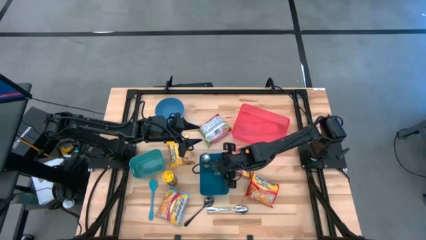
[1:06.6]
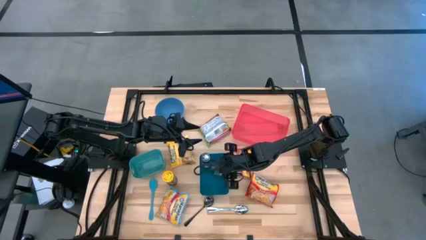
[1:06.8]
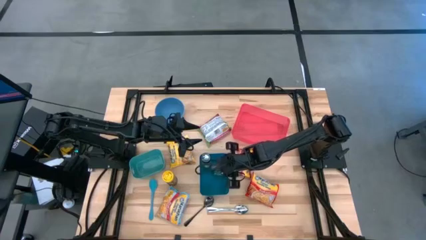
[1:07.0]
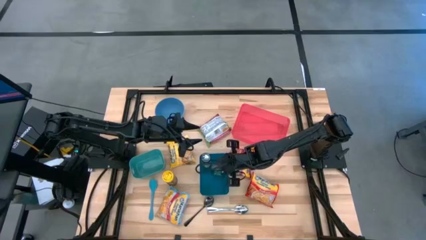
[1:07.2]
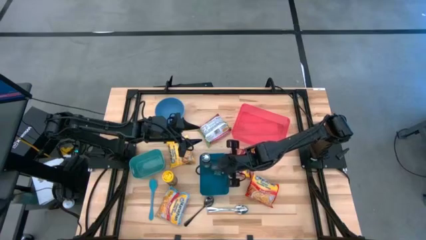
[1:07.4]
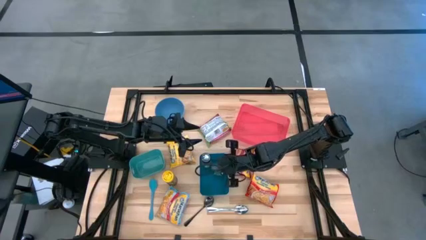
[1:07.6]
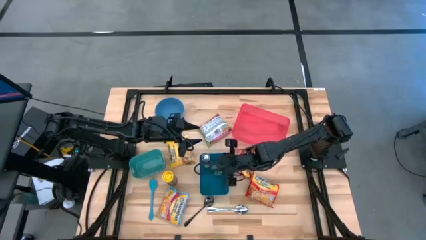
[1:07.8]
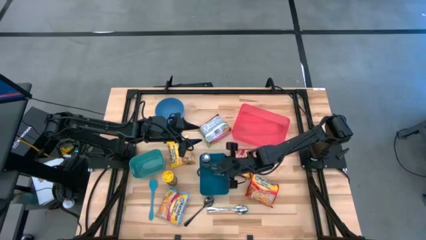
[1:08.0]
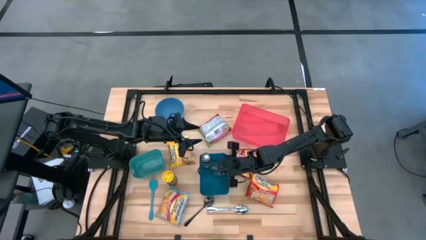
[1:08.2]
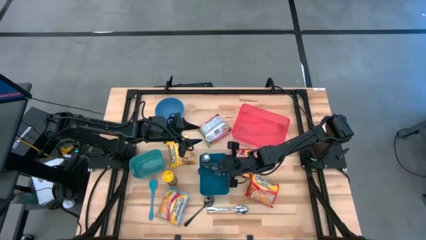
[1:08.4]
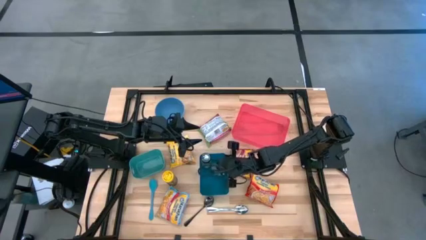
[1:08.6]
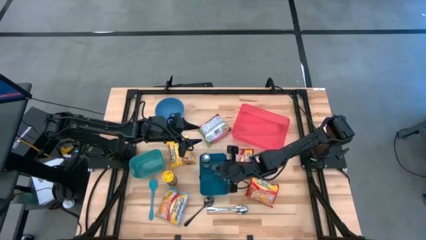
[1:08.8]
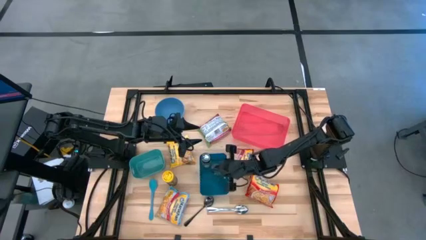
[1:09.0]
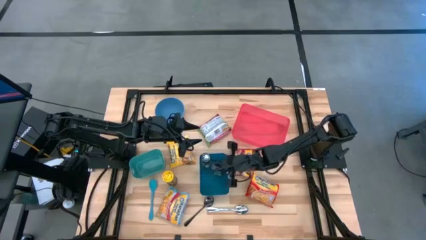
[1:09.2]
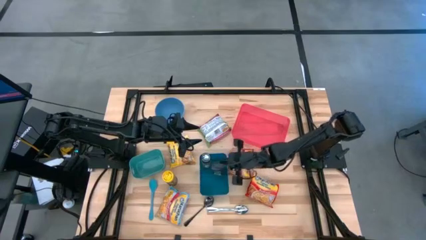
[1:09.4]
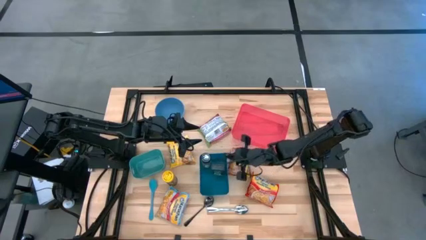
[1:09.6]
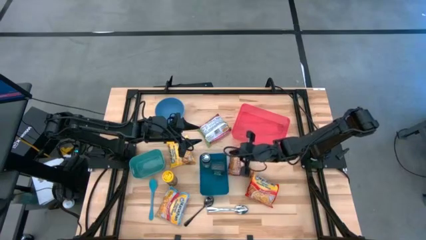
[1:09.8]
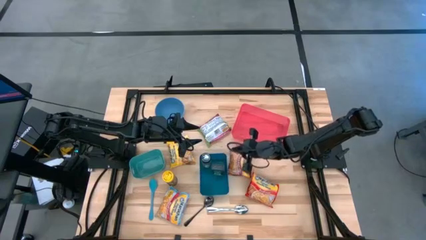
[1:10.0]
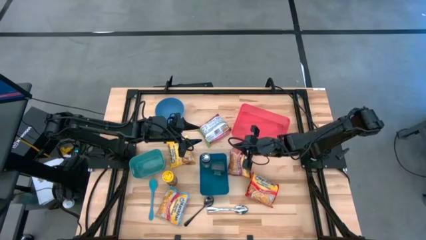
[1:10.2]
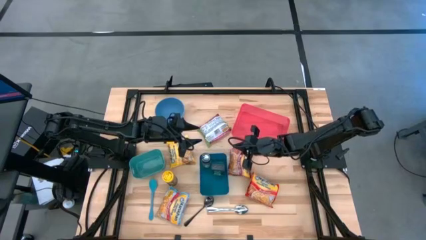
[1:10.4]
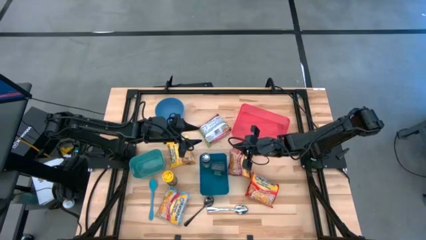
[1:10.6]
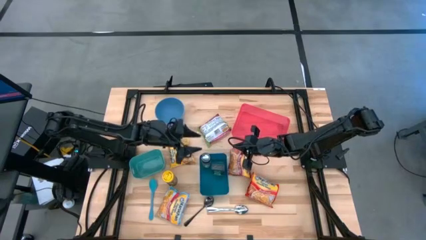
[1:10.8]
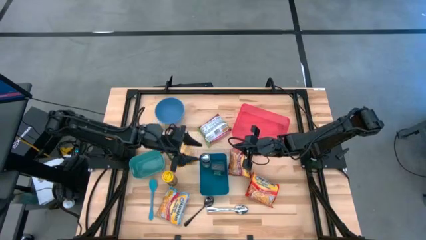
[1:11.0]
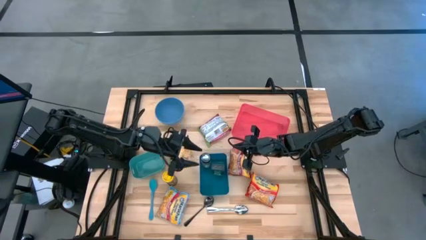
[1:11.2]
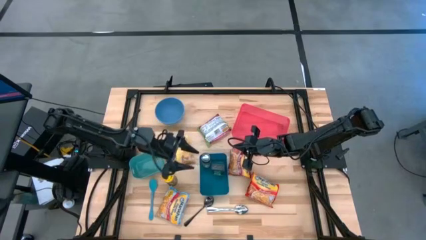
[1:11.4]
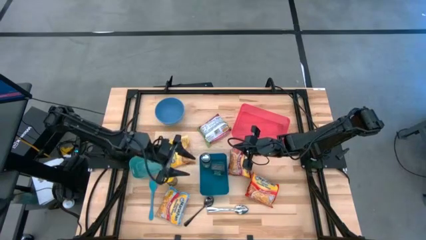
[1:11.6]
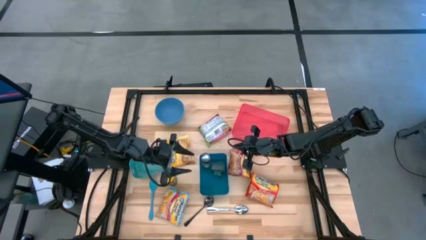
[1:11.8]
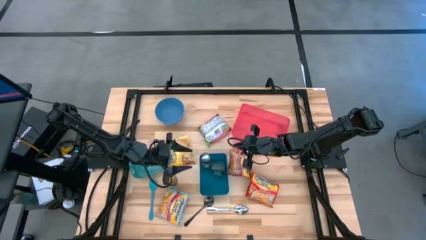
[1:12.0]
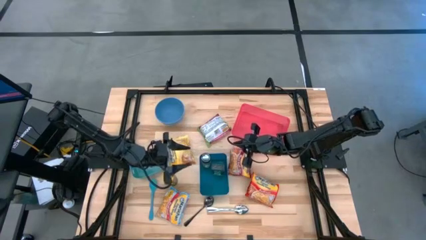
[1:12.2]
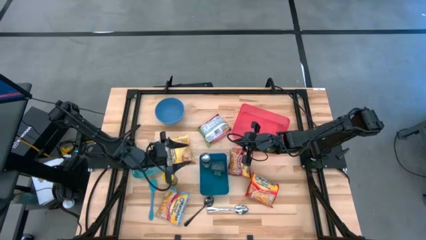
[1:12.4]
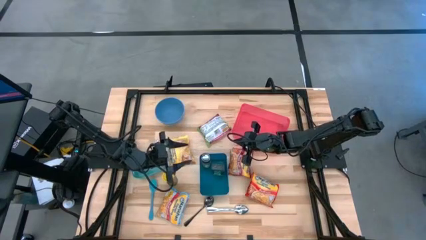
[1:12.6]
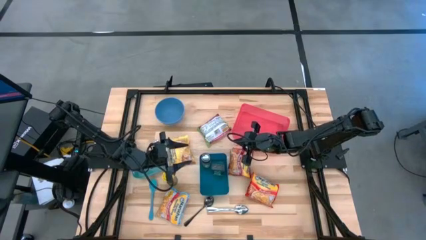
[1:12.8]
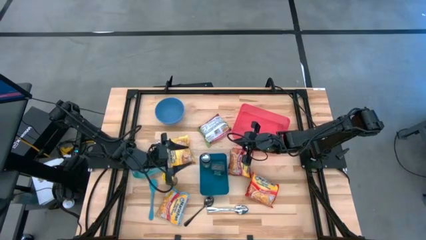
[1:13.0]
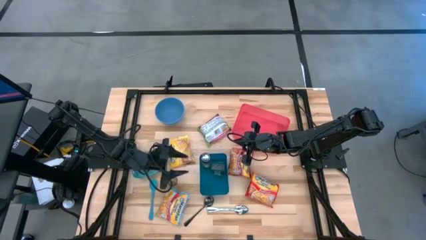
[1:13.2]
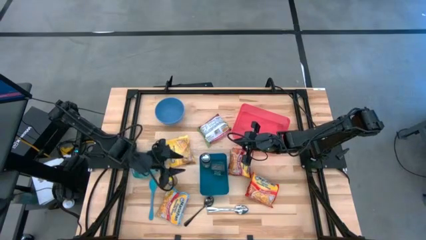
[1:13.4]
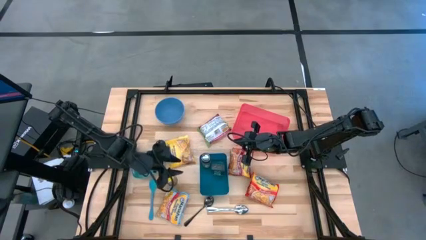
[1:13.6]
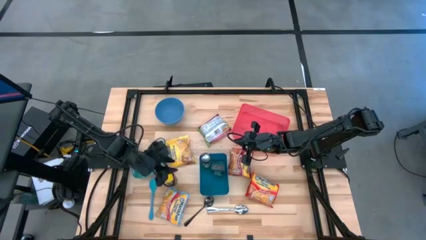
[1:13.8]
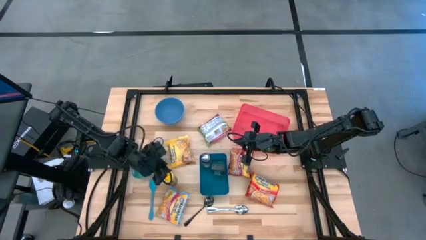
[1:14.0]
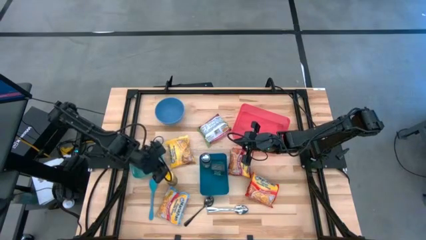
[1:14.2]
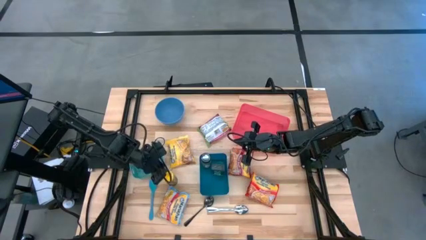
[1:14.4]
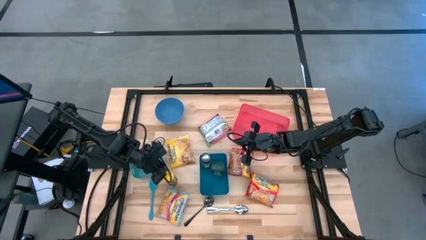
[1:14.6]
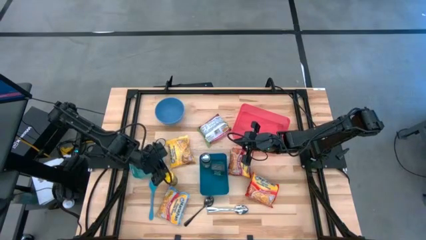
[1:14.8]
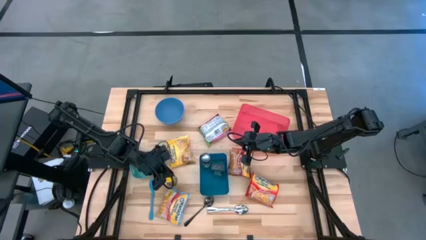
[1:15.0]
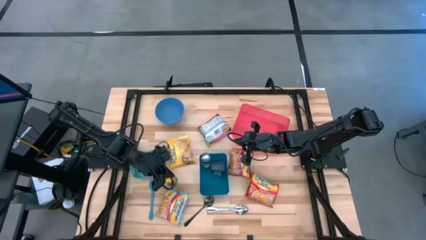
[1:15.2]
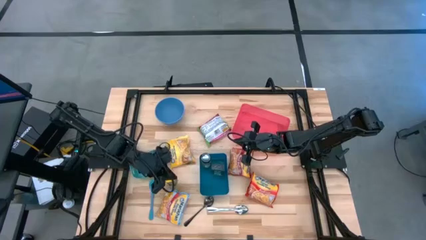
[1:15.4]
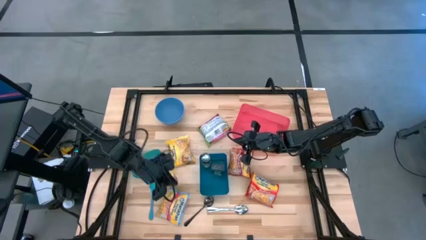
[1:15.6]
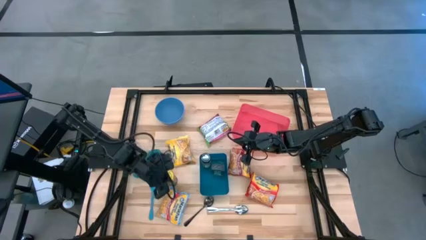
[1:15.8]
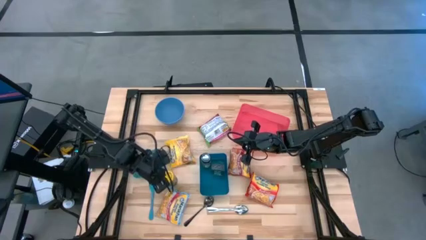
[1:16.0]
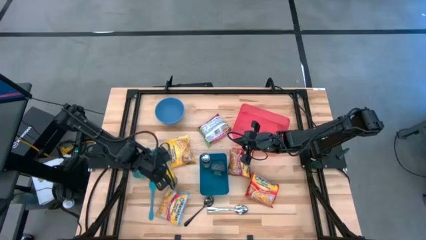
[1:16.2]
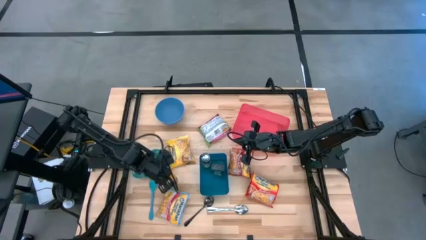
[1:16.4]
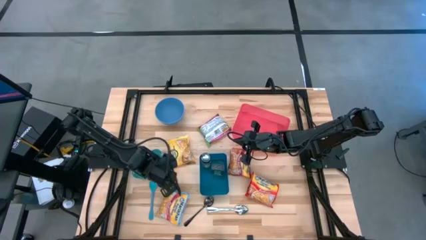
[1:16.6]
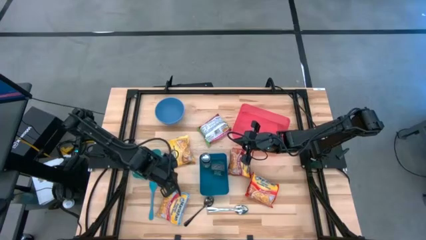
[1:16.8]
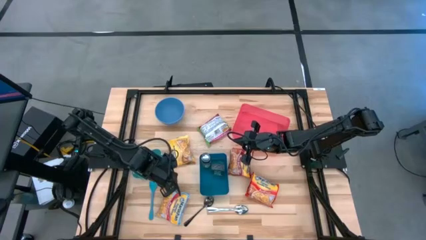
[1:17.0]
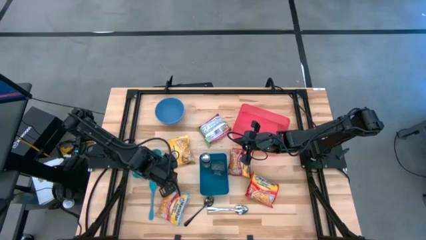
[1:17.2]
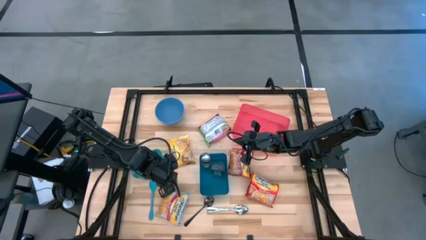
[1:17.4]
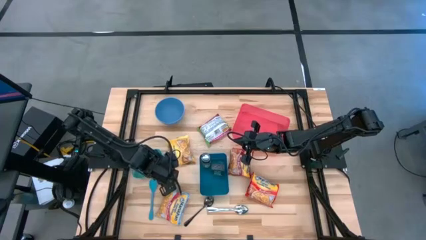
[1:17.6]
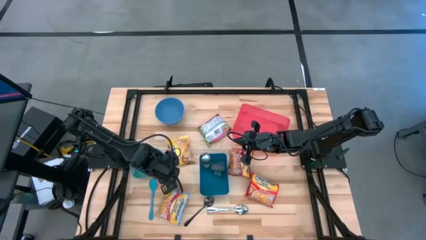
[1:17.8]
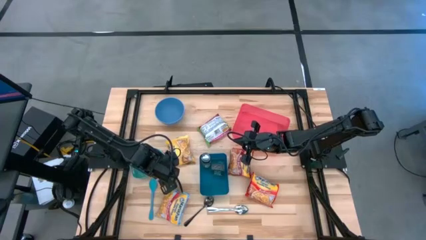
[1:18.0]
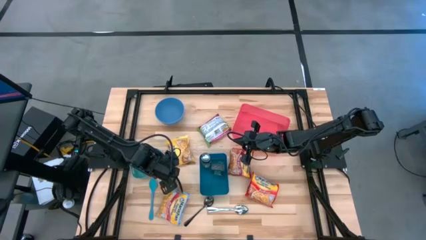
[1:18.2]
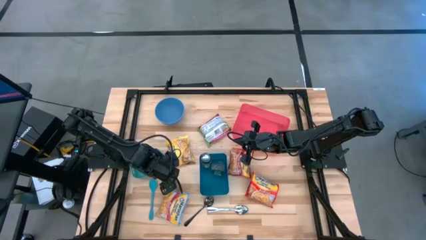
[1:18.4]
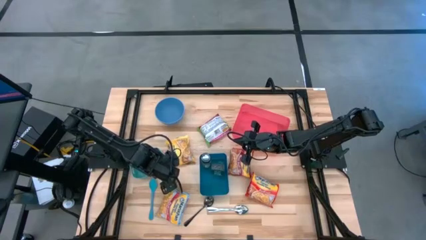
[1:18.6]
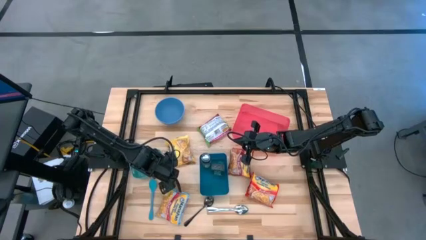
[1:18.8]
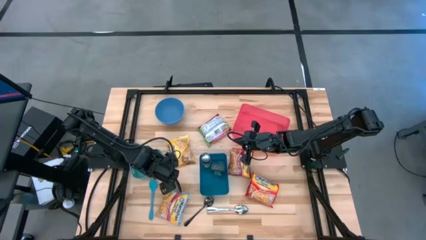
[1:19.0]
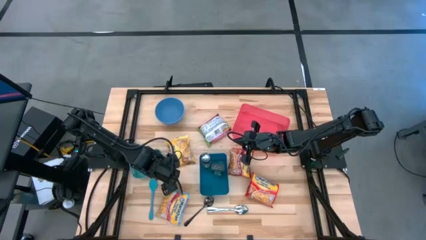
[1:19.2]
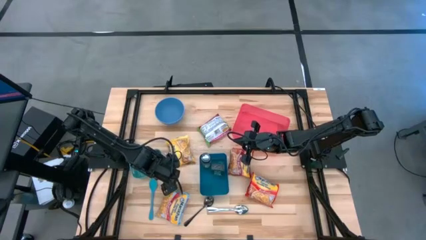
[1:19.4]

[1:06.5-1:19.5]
Task: Pick & Place Food Item
Put the yellow seasoning bottle into the blue bin
